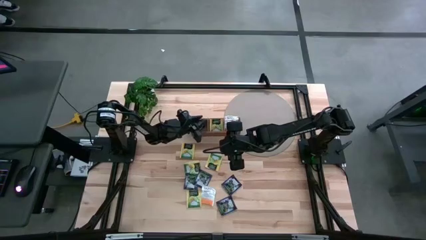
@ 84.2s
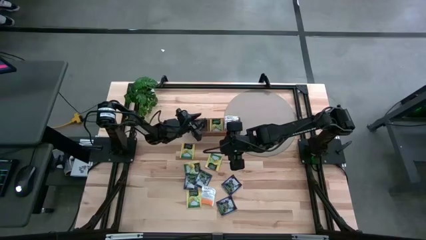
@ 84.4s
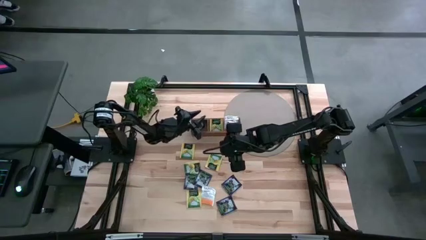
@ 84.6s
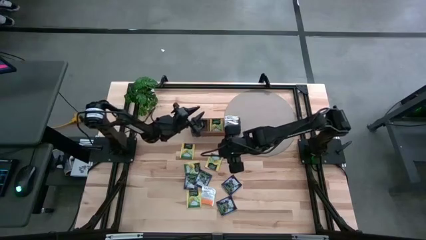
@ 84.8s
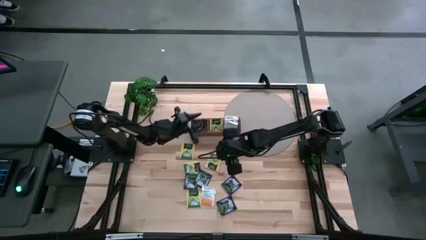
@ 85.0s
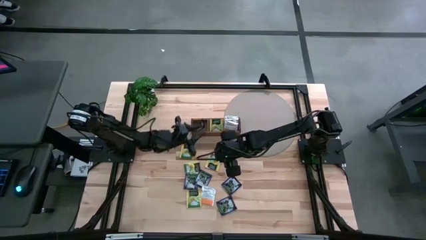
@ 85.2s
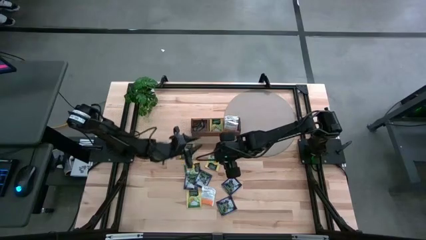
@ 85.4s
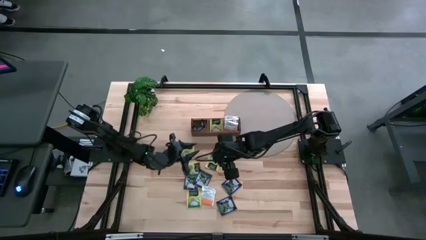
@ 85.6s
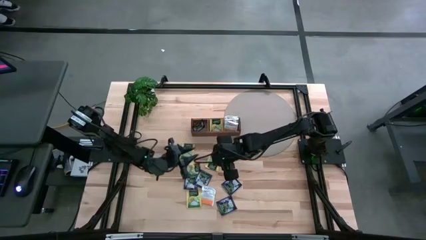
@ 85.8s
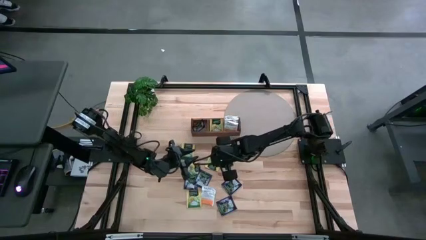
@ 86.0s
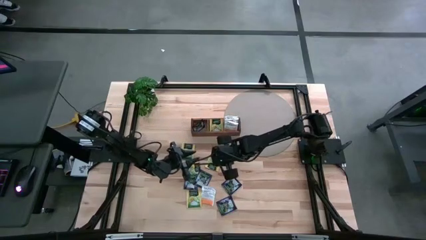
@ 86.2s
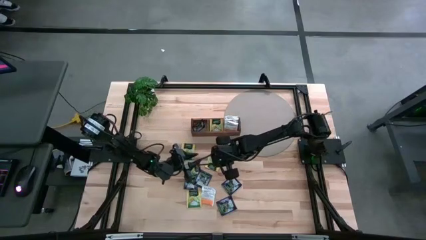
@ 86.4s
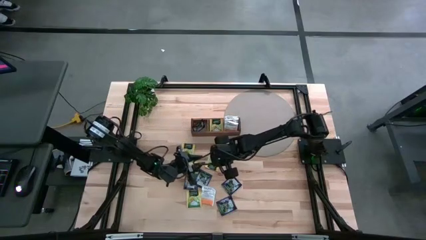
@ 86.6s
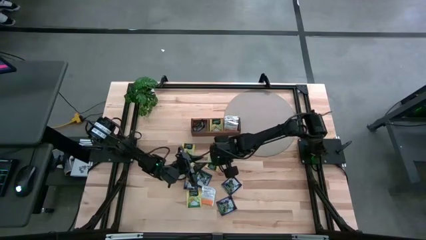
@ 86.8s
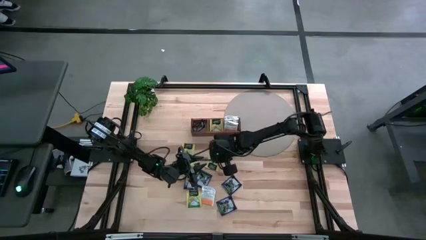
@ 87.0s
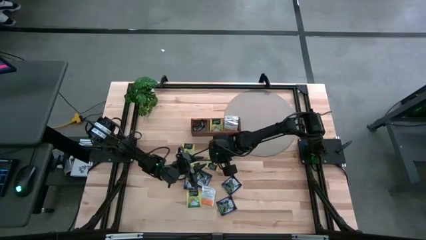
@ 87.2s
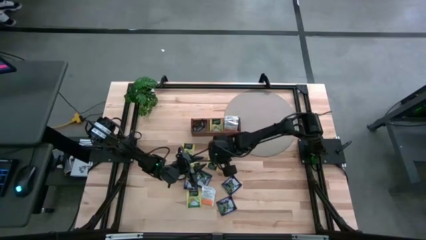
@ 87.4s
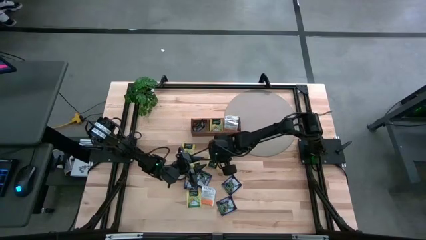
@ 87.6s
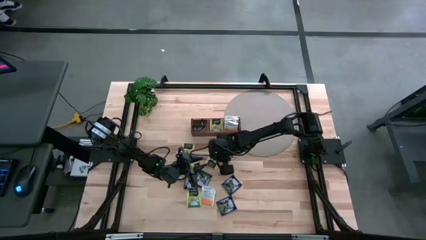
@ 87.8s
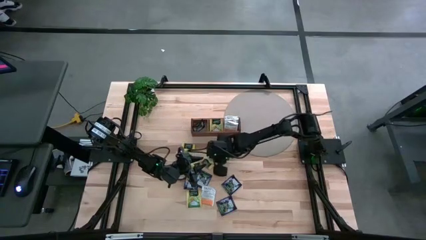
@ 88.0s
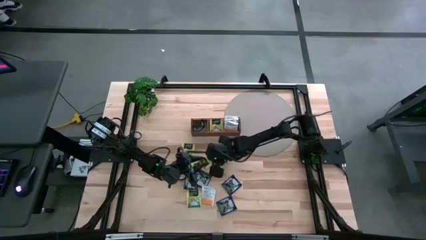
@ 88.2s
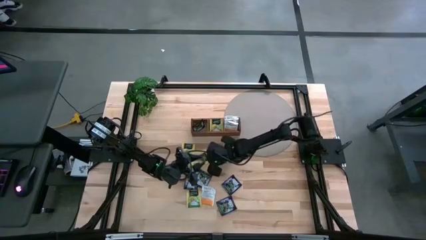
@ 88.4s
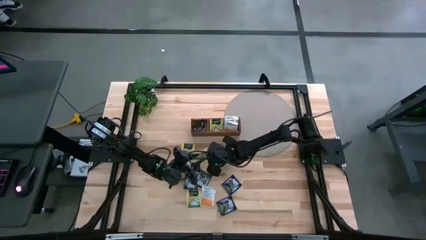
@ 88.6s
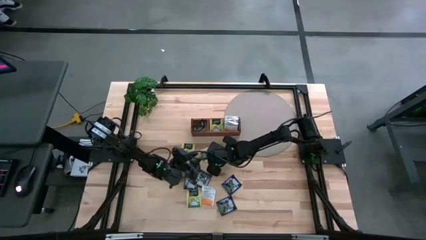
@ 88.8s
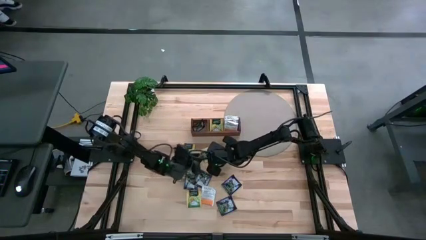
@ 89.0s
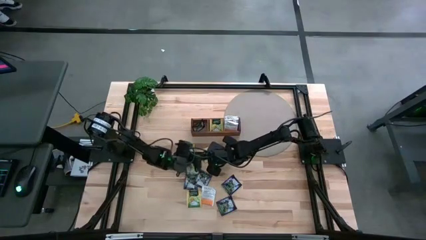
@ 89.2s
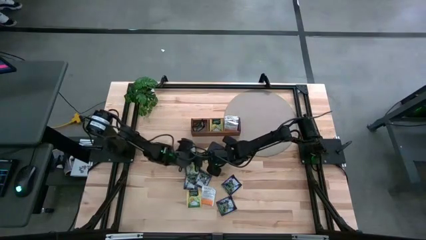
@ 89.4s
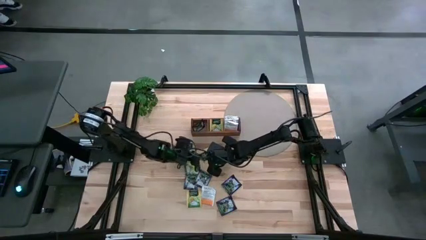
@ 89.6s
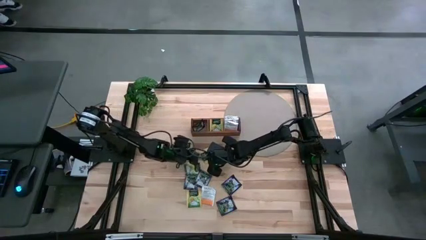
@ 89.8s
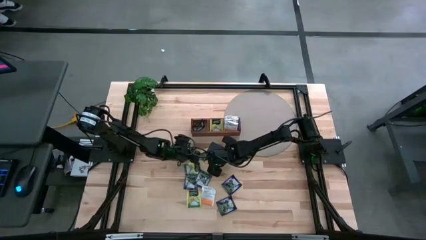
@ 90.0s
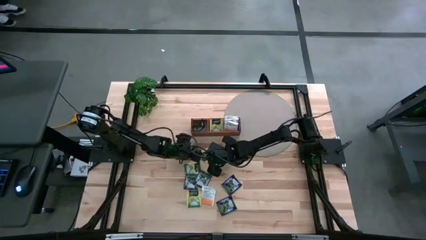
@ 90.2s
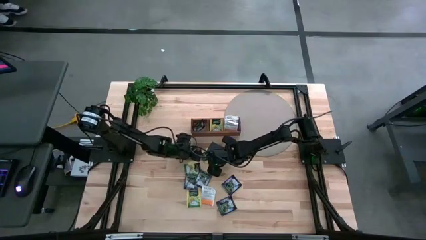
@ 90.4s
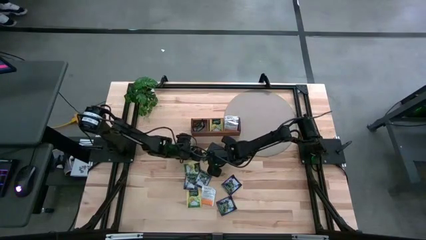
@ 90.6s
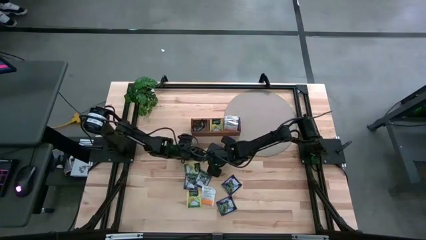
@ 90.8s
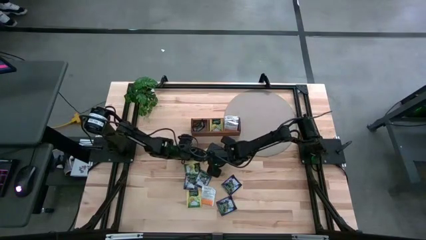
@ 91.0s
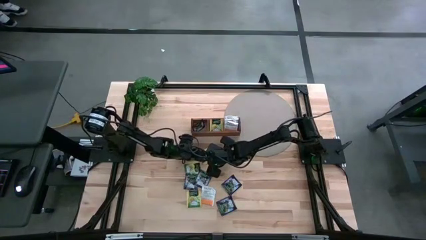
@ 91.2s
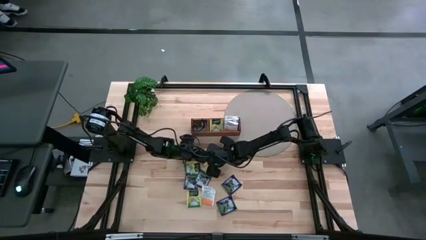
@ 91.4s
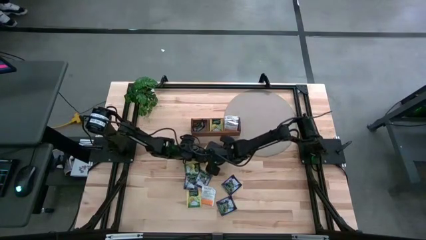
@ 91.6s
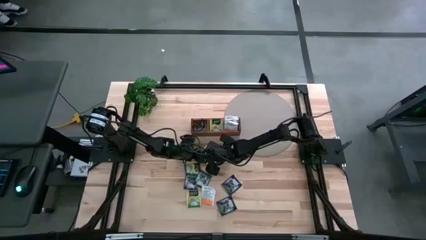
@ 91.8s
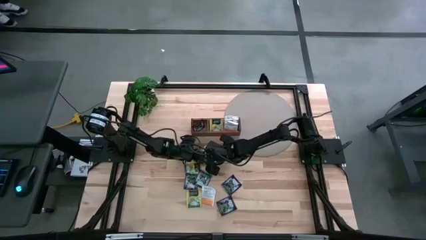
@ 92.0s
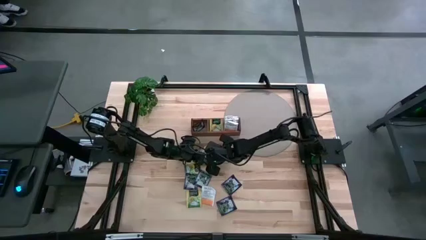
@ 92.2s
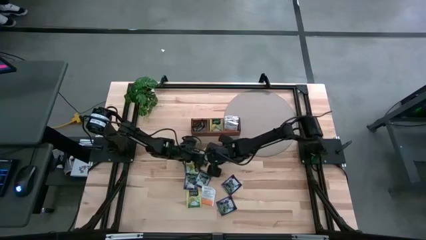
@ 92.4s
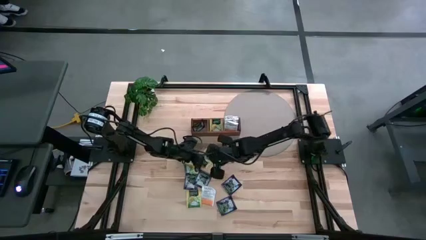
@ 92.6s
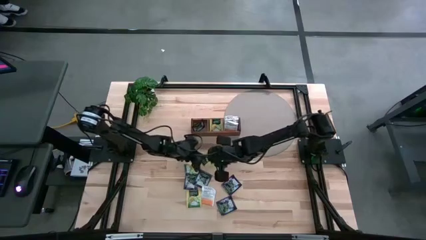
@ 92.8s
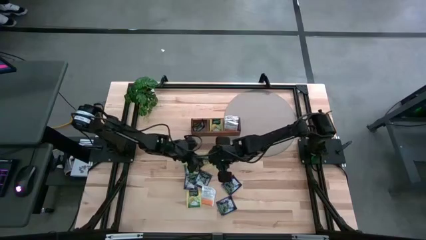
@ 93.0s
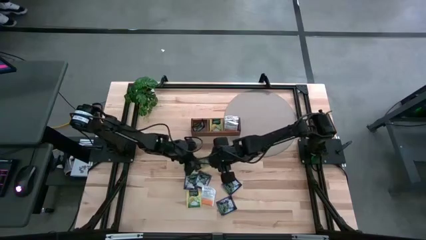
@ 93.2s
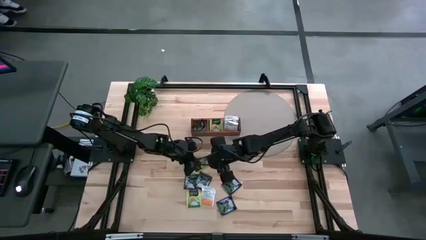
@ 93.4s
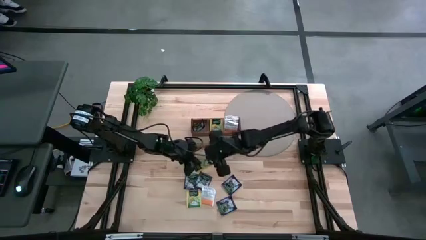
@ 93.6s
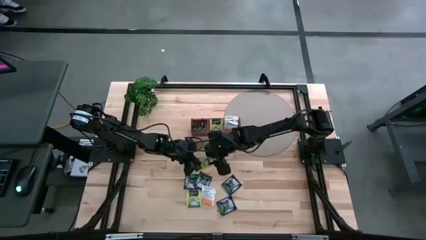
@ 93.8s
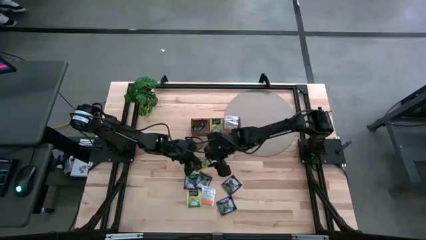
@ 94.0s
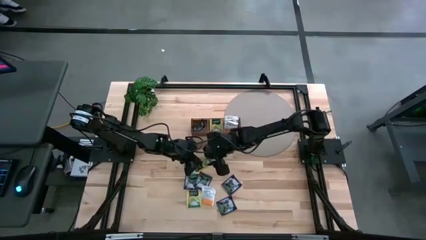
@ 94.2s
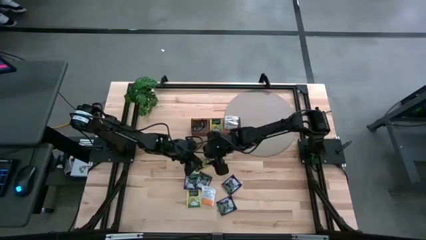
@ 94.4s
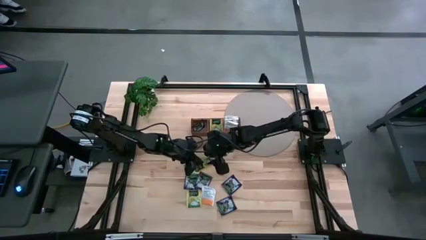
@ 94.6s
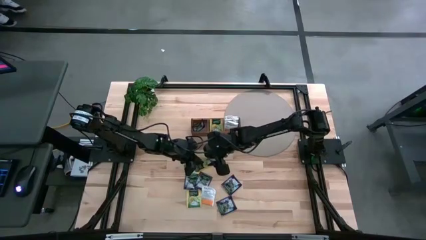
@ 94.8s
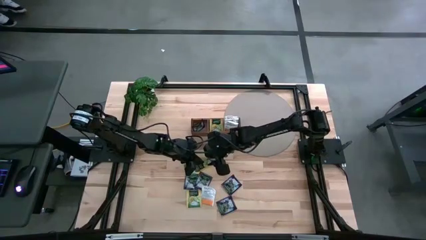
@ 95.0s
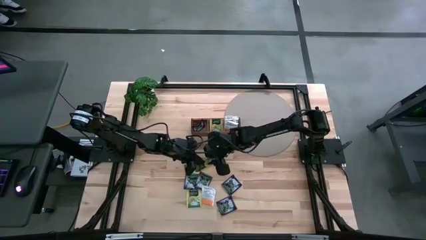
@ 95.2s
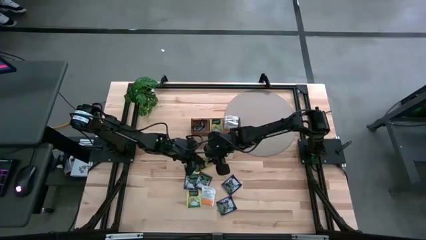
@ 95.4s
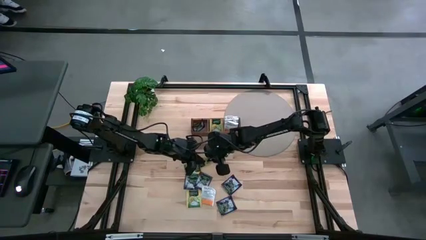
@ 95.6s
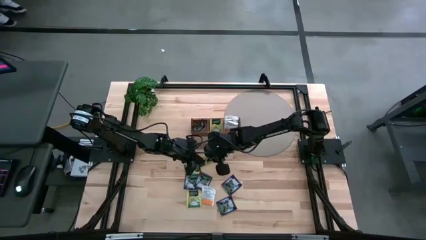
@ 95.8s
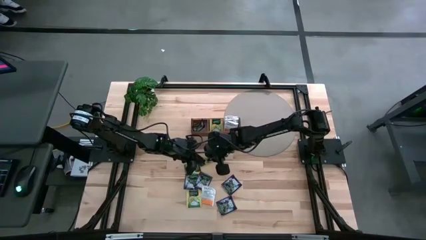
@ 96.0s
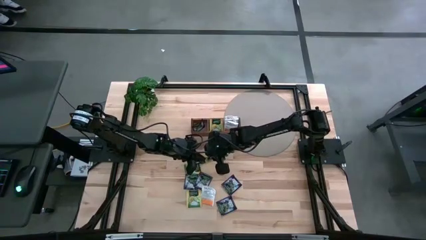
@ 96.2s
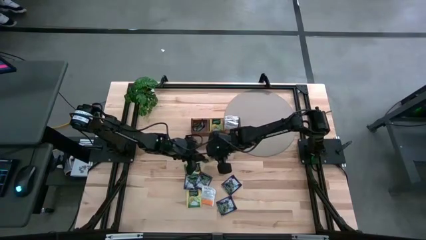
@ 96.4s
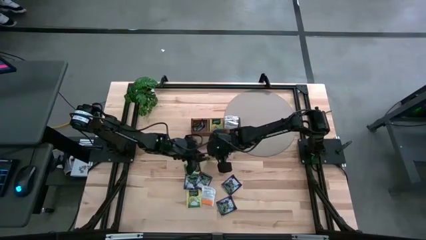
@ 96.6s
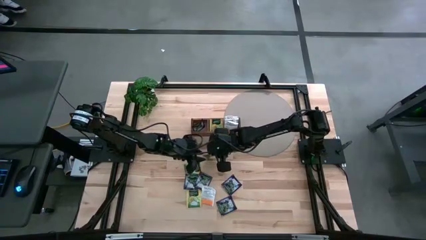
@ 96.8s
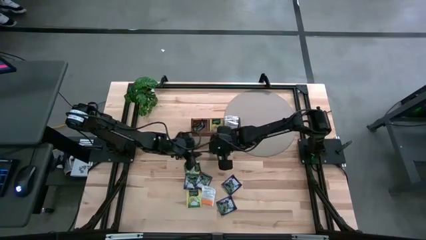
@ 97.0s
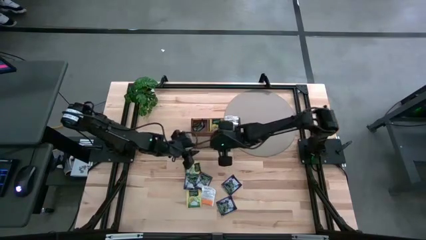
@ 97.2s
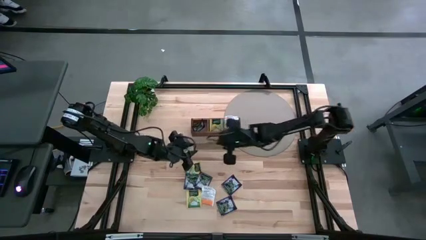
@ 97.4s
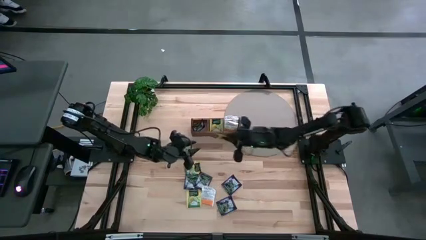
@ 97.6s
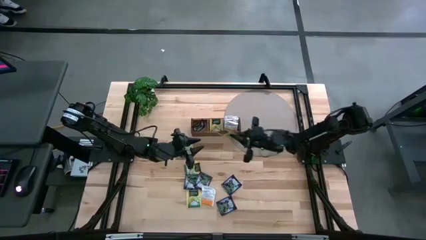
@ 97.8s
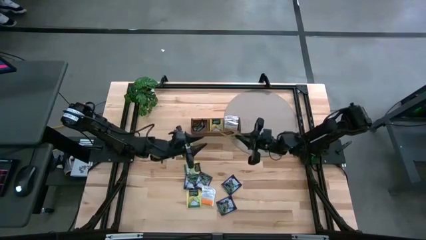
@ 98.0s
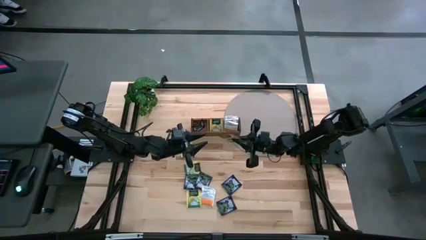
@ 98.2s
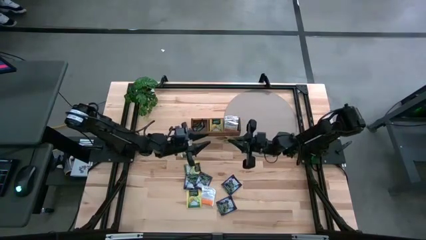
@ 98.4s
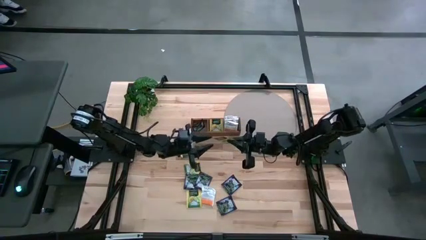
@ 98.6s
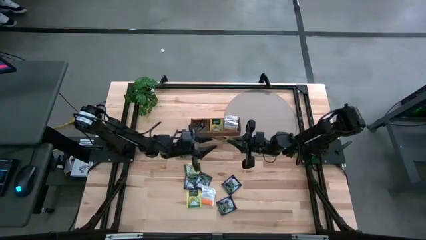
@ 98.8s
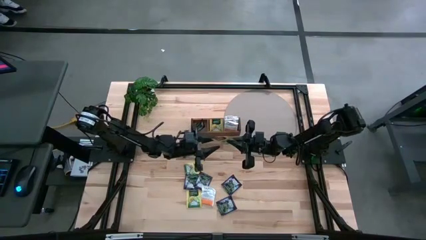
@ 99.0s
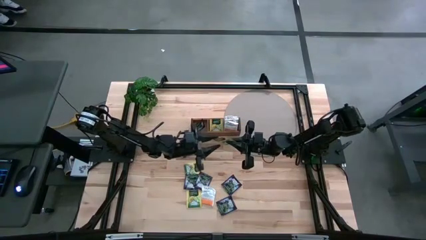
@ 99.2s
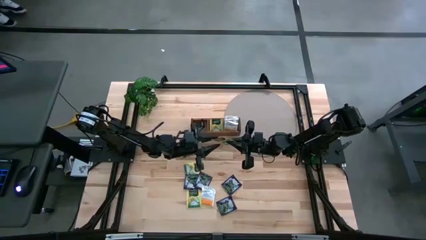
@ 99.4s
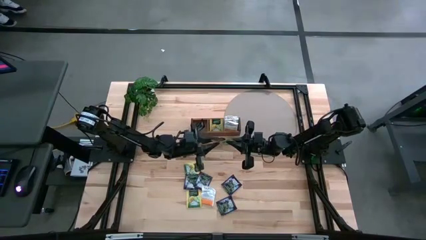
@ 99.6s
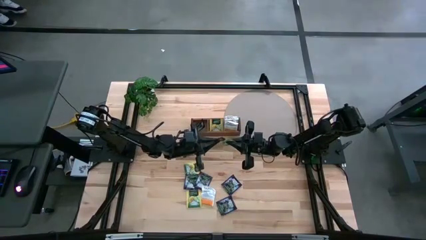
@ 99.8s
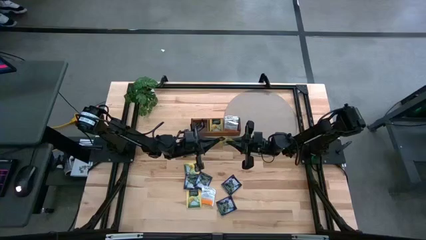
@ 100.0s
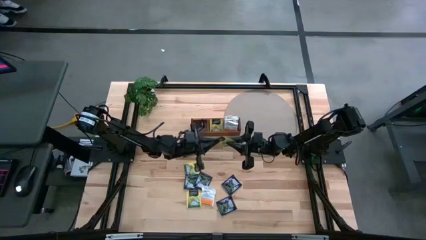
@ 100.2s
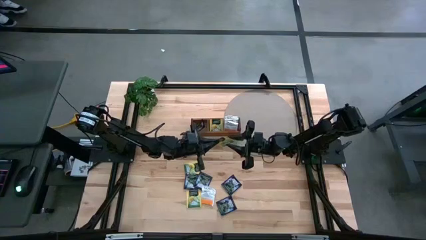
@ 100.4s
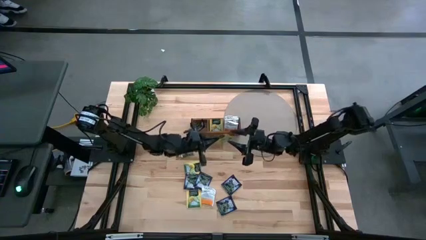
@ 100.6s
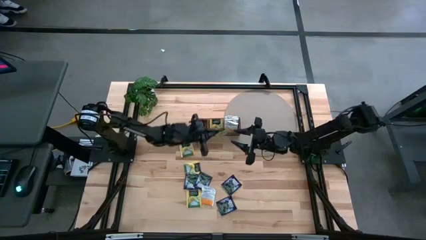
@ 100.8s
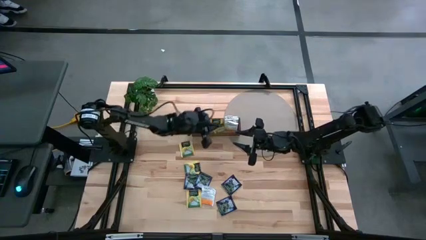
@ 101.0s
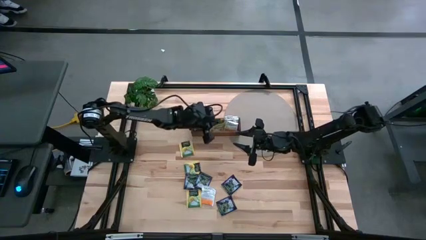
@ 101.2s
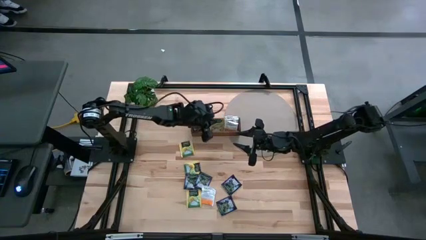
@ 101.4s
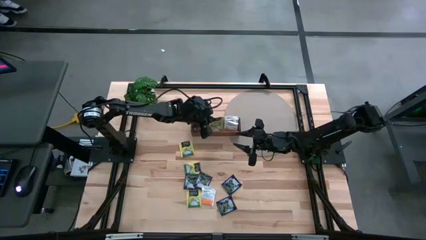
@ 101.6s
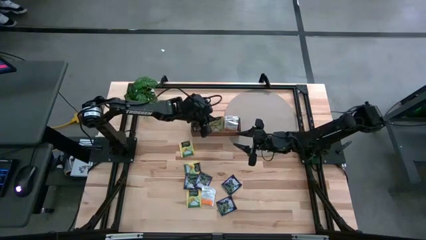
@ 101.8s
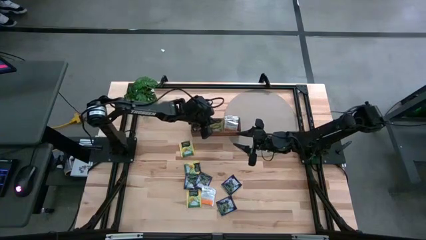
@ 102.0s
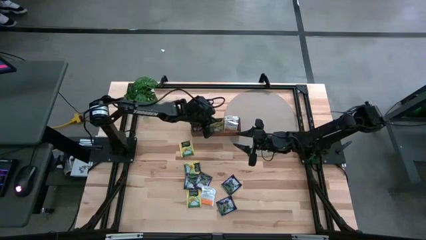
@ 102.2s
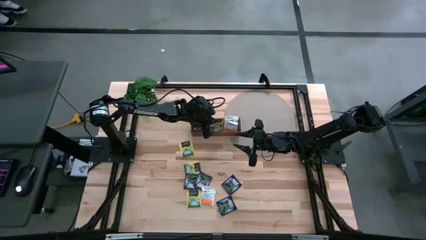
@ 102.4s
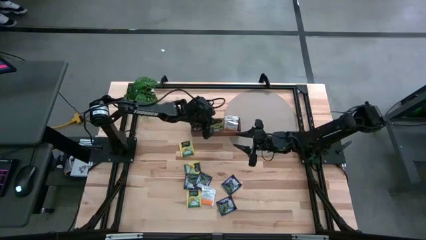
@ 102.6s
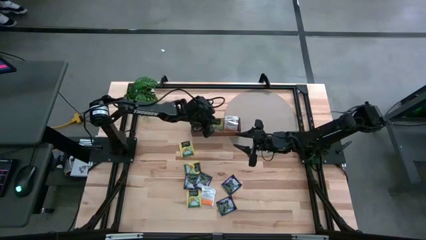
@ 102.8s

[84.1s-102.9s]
Task: Pick & Place Tea
Put the yellow tea bag into the middle section of the wooden organizer
